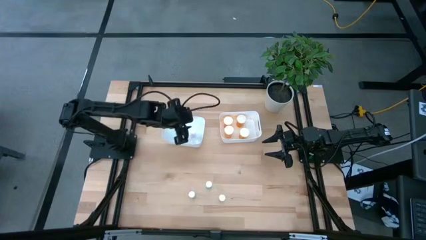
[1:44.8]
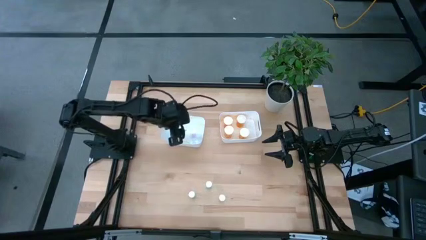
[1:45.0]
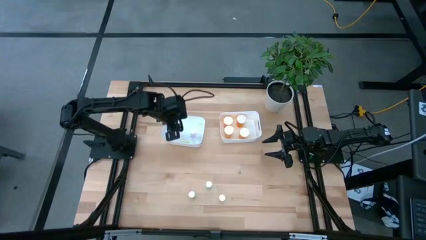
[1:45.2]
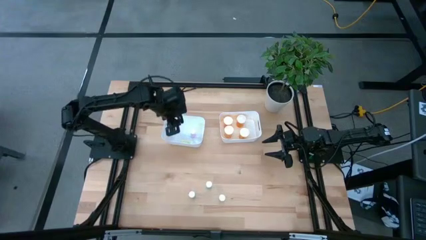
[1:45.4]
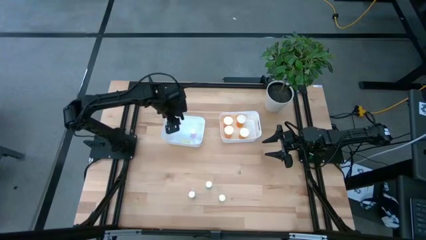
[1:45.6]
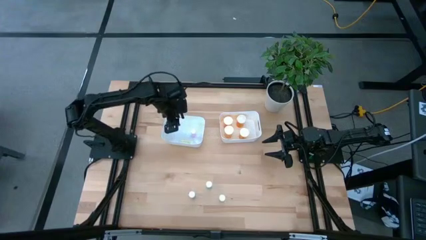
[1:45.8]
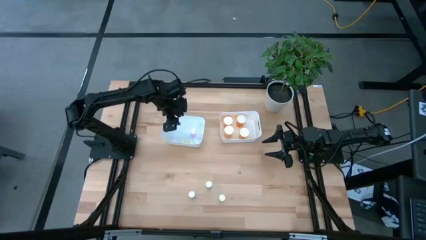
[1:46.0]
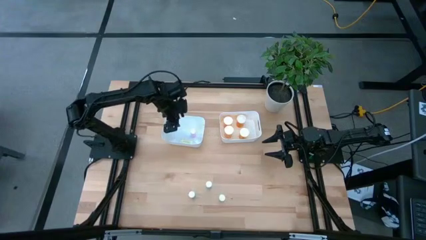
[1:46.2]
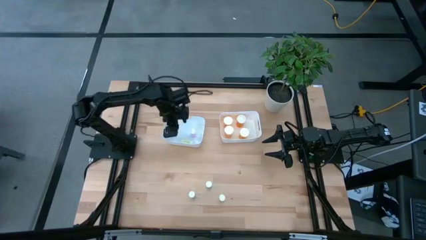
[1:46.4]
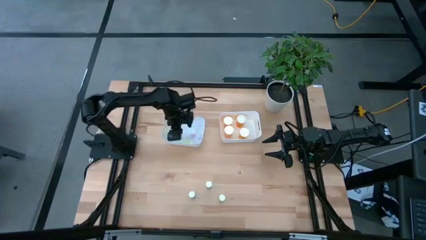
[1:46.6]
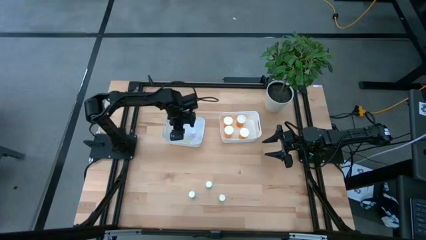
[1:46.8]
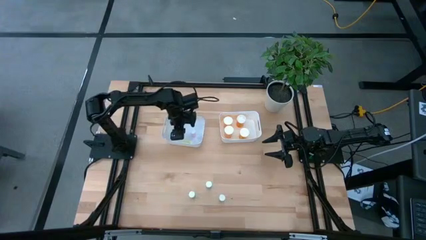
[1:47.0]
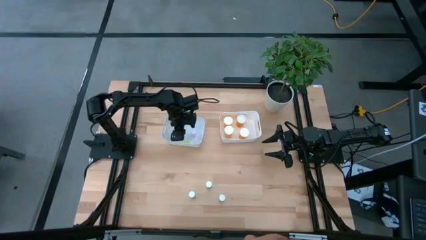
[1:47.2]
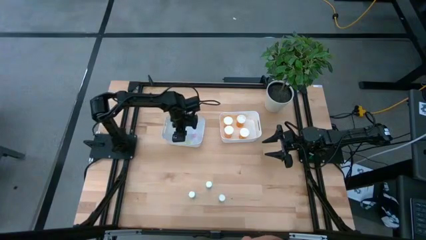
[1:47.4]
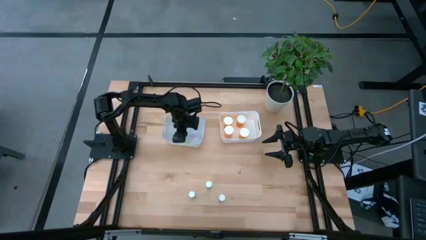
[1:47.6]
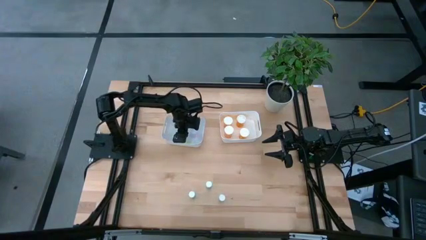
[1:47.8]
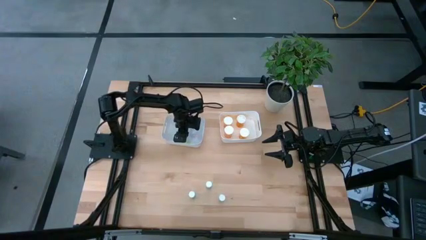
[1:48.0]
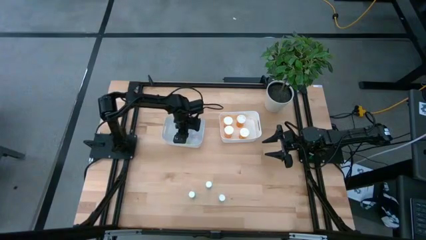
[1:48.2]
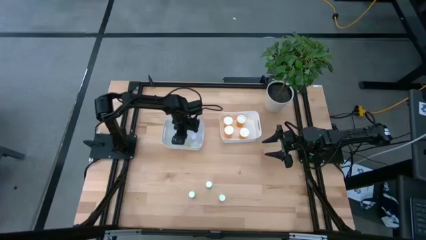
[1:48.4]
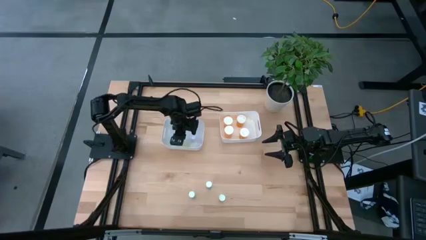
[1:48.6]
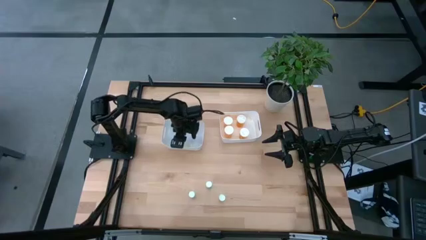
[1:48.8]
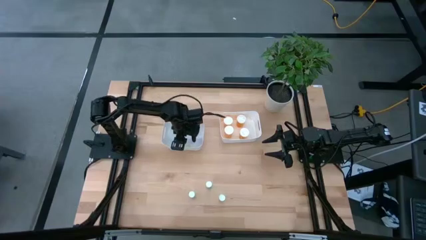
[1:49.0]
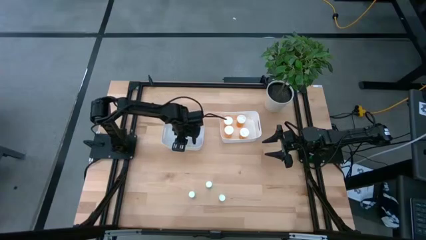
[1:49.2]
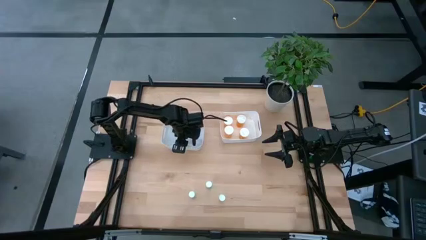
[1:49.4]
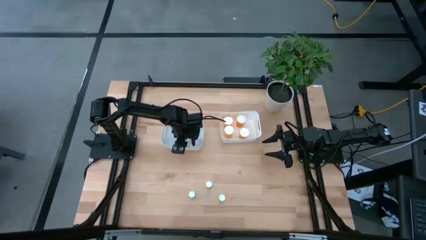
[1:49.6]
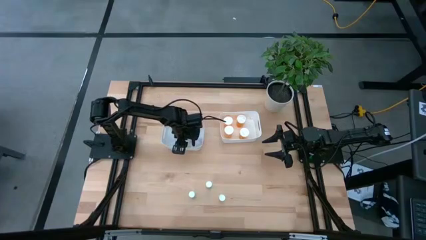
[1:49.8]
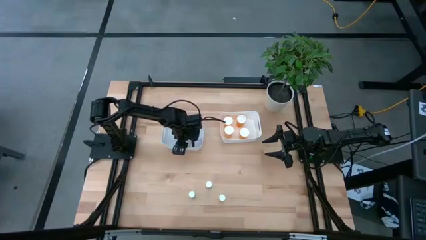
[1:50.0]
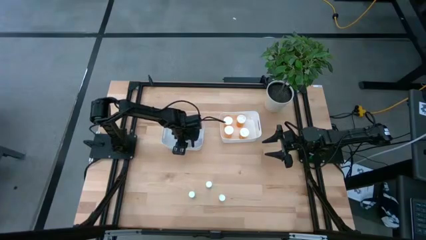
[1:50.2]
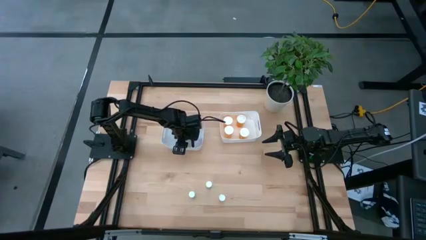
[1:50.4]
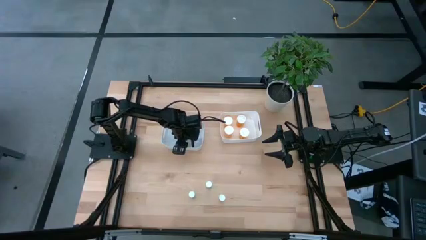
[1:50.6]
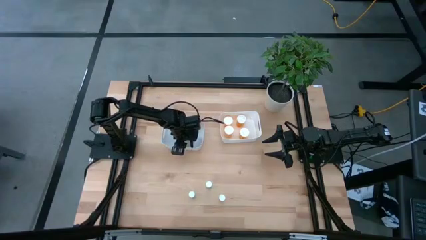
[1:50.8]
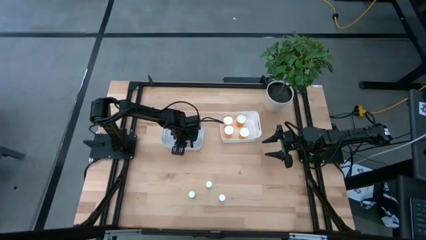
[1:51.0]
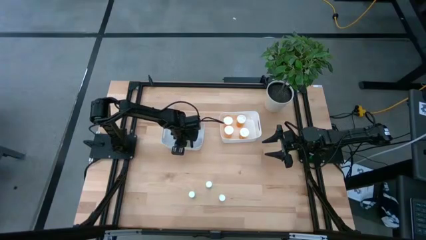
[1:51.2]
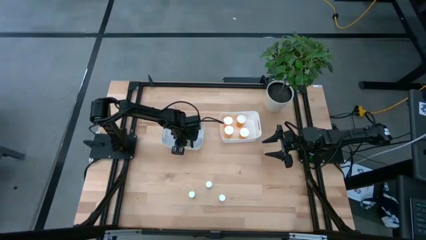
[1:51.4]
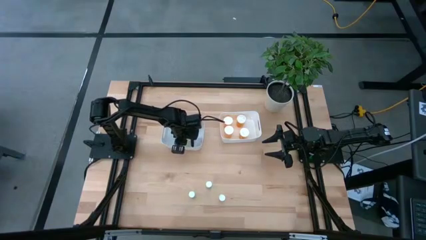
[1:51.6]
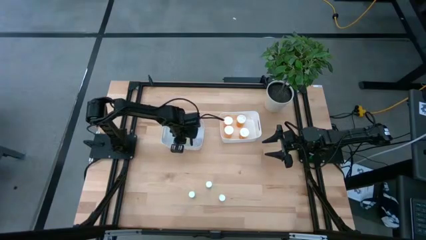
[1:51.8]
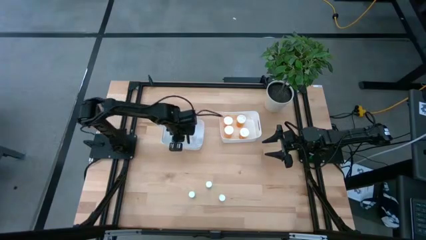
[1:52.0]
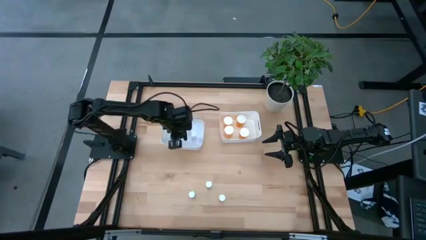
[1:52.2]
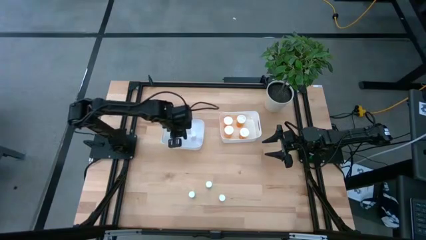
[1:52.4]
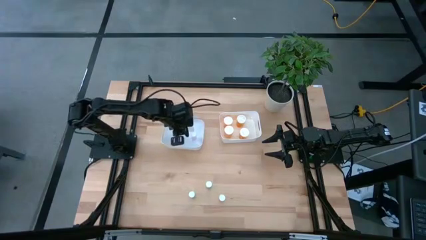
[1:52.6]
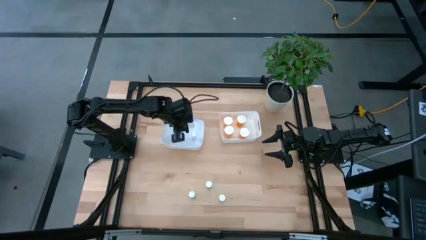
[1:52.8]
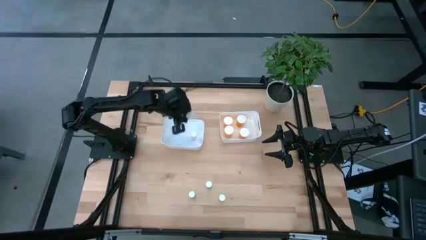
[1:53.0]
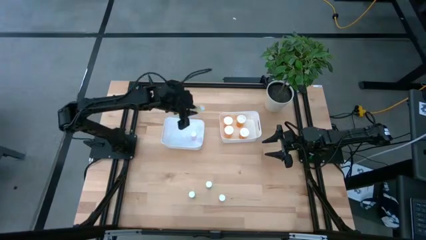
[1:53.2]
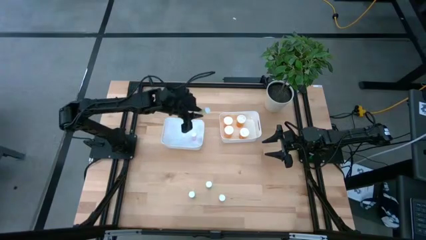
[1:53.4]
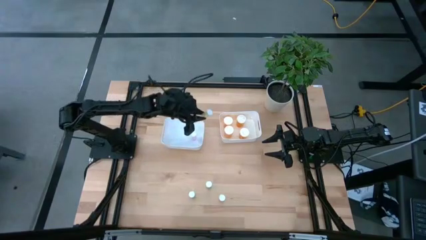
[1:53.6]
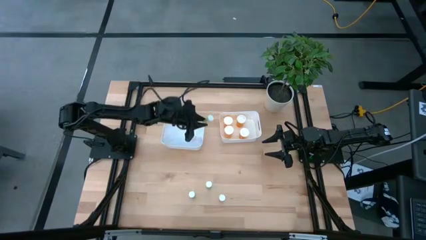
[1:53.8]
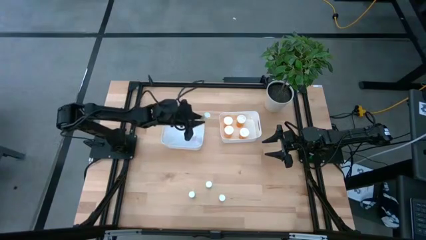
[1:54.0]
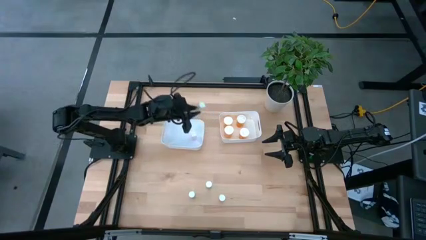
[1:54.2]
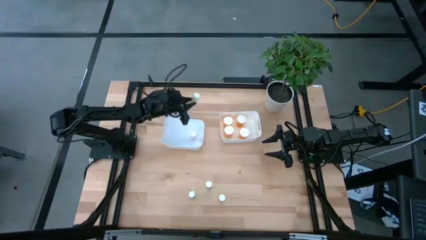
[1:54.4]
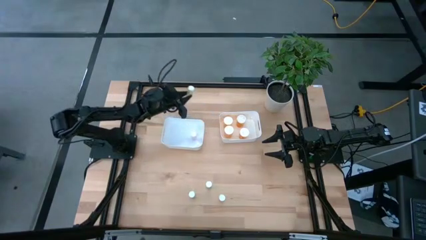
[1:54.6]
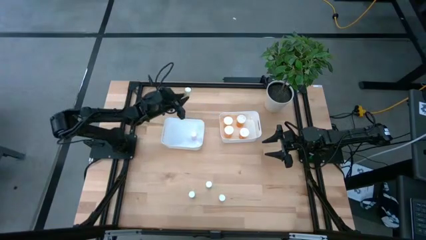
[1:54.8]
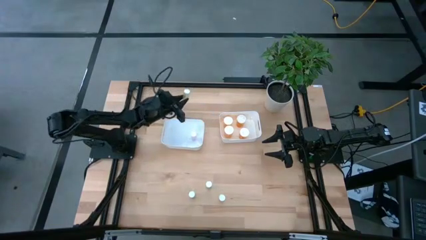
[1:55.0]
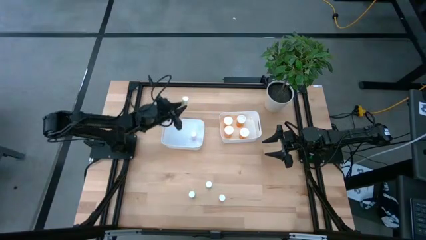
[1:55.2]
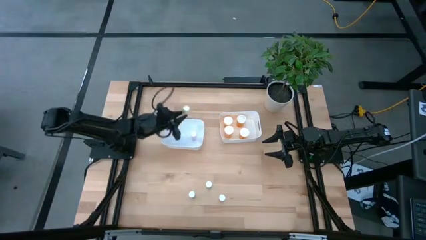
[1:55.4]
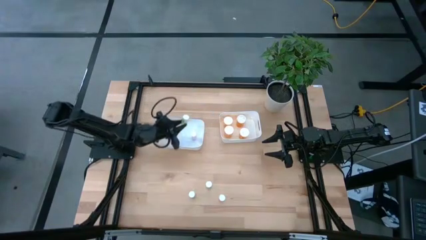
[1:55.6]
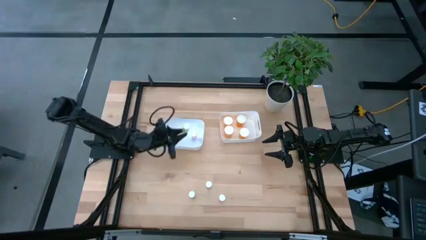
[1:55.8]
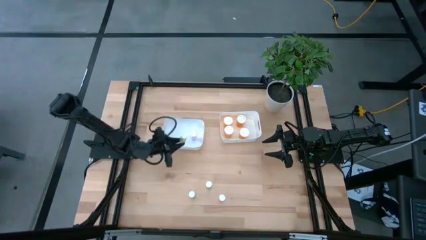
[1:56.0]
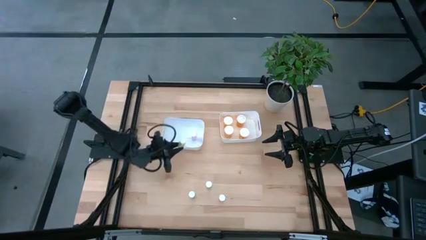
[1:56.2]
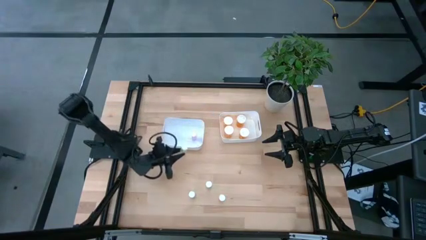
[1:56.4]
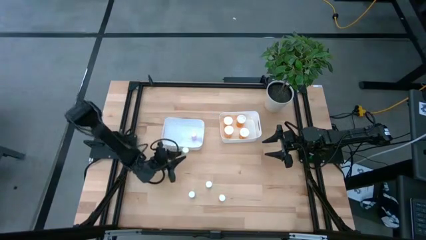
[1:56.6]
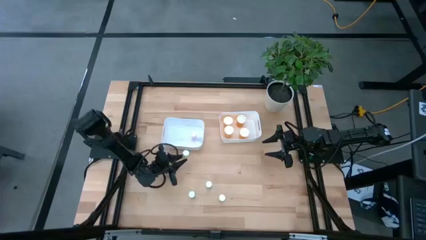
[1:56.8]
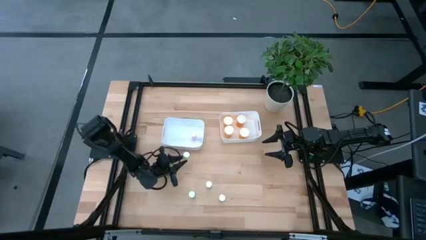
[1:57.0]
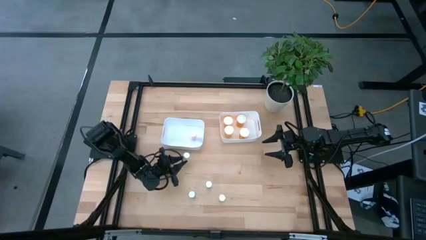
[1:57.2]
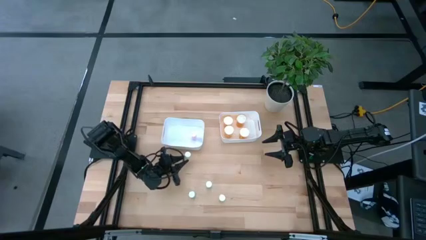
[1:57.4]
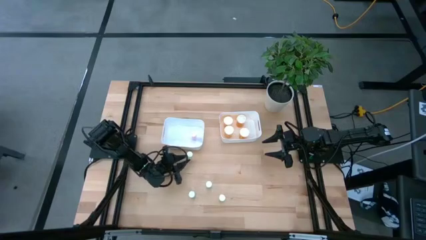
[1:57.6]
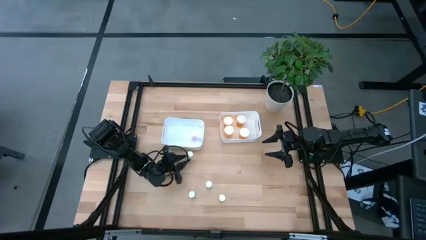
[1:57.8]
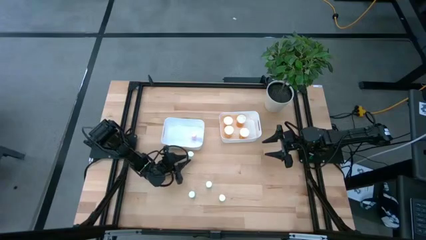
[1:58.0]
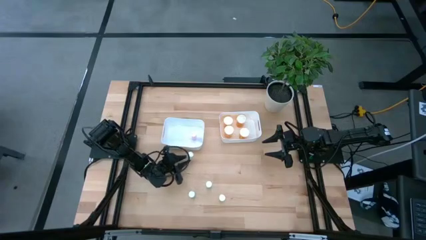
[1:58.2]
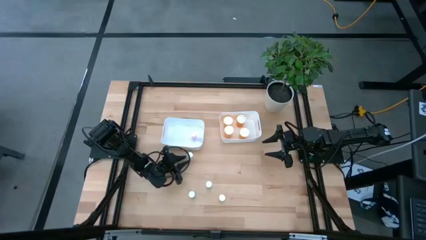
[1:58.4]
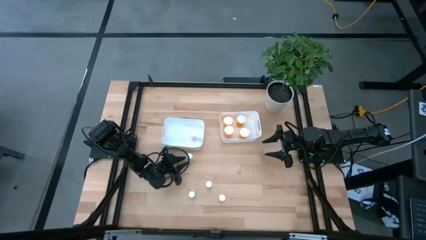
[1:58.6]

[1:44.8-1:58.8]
Task: Pick and place medicine bottles into bin by pill shape (circle, oval)
Put the top yellow pill bottle into the left white bin

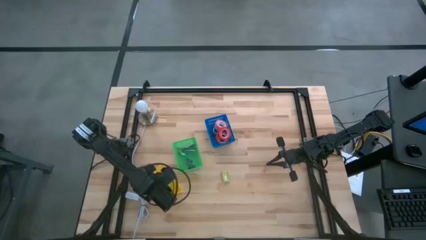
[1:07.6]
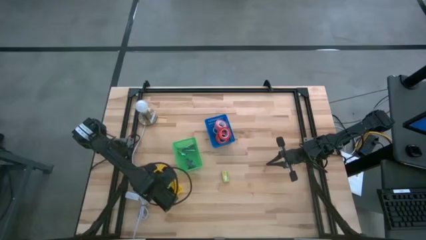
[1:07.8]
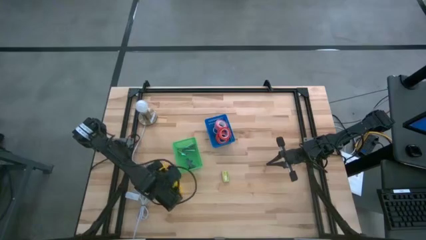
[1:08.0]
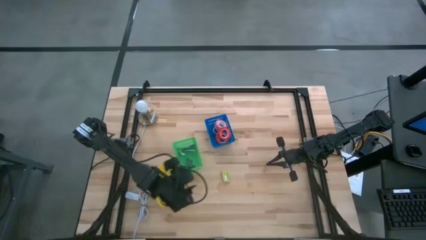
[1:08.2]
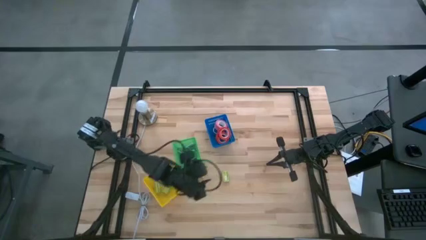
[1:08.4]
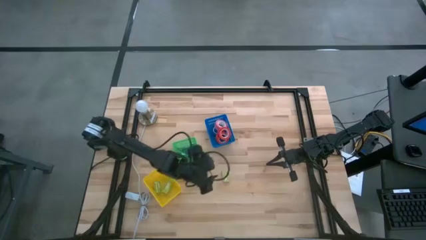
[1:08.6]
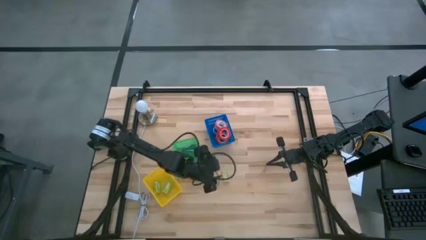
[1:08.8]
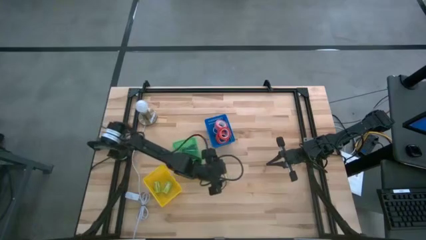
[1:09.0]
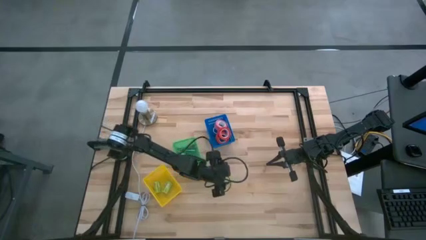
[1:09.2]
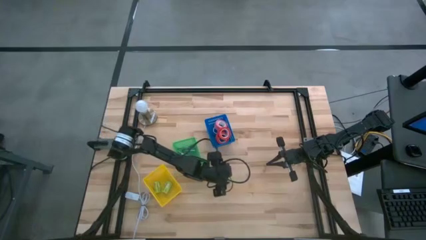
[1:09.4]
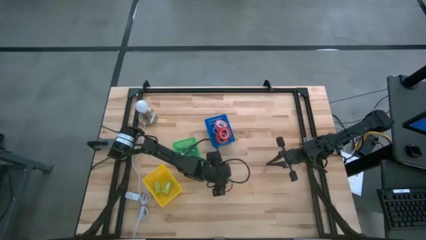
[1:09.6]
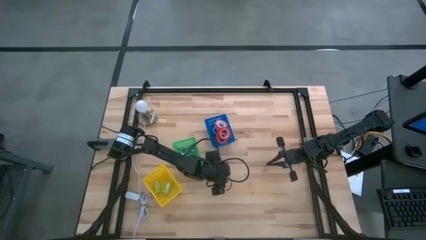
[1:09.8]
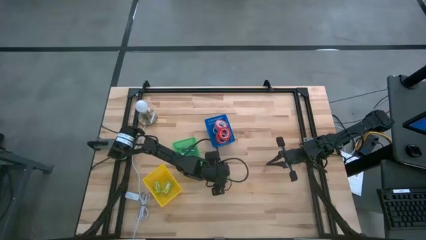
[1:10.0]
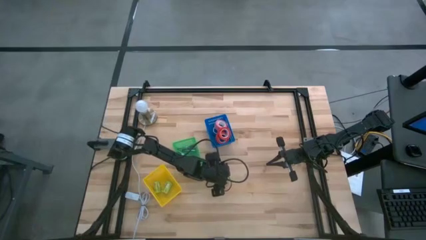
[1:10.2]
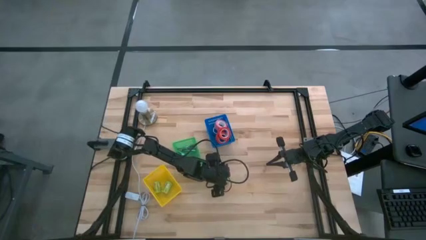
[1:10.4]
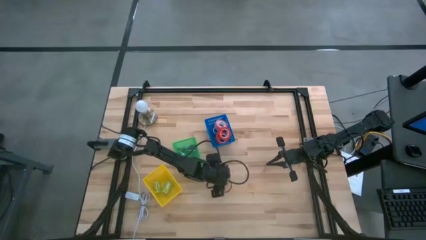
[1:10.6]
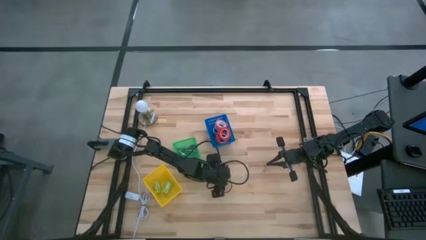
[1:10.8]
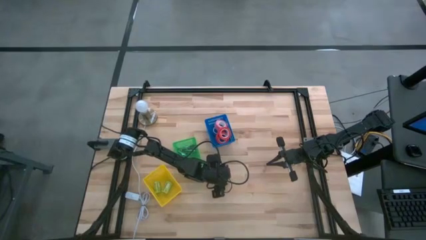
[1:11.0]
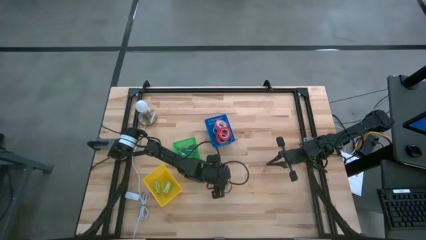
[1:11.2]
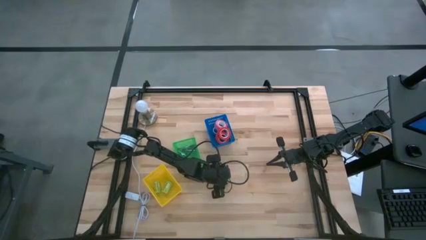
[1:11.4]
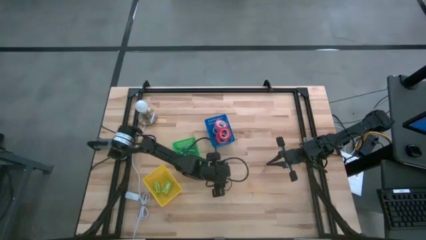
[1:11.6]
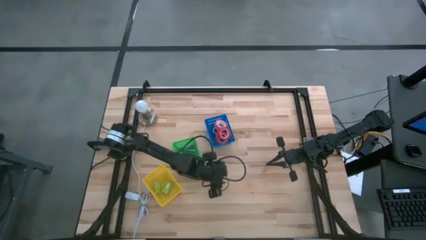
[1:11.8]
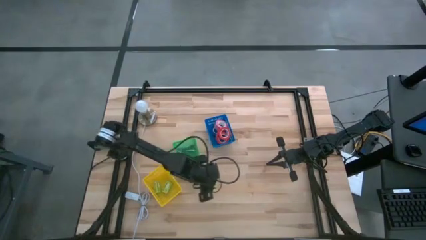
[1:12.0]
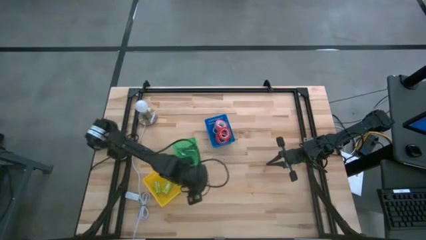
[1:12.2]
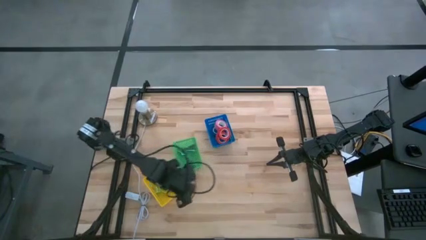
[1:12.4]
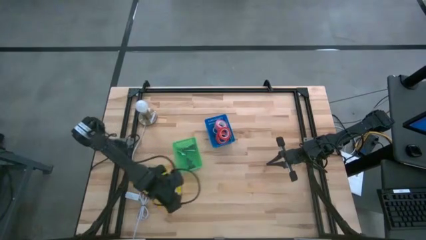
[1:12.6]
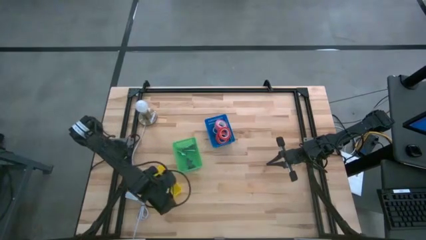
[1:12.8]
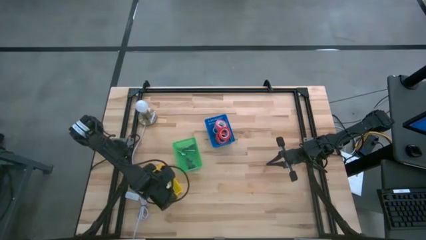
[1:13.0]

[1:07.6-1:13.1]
Task: Pick and place Stapler, Stapler remover, tape
Put the green staple box into the yellow basket
